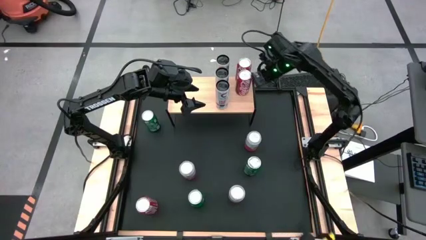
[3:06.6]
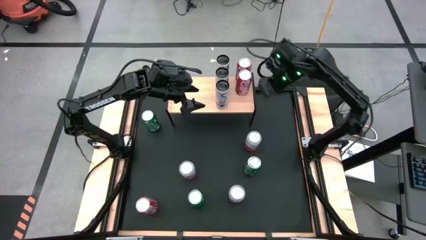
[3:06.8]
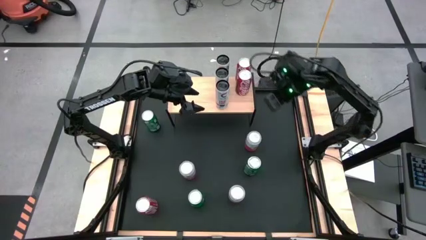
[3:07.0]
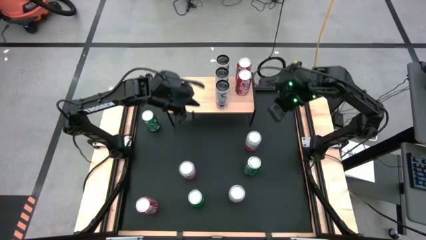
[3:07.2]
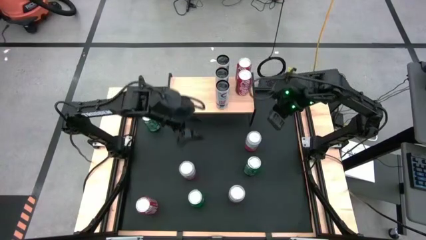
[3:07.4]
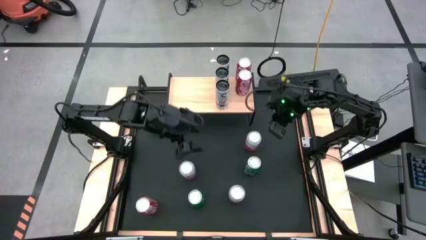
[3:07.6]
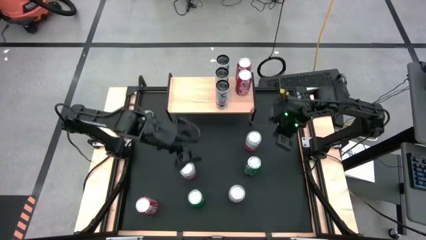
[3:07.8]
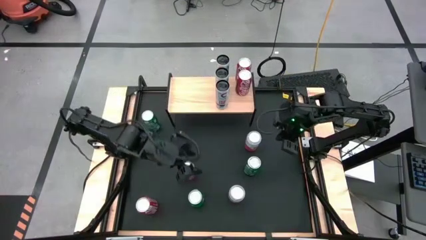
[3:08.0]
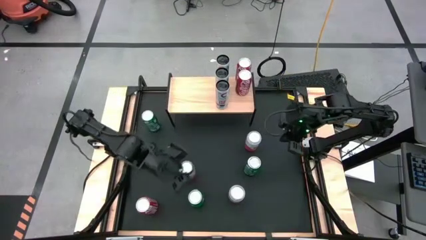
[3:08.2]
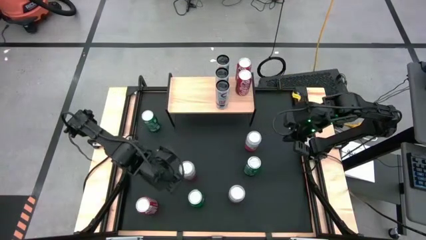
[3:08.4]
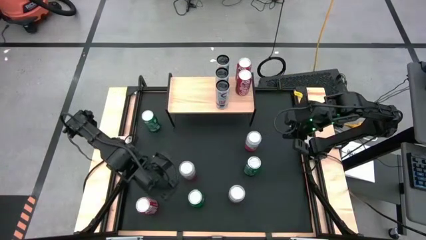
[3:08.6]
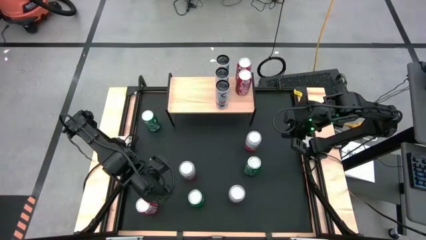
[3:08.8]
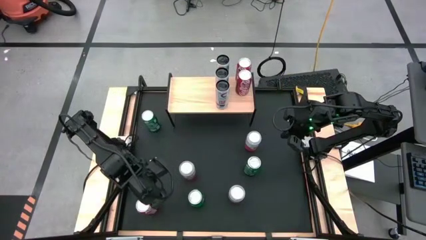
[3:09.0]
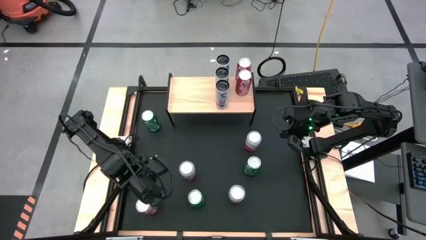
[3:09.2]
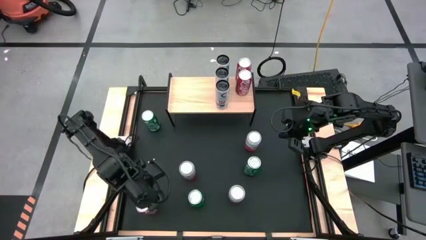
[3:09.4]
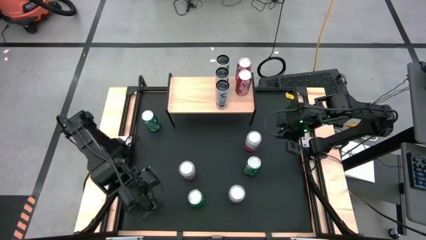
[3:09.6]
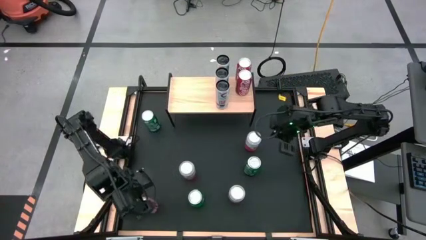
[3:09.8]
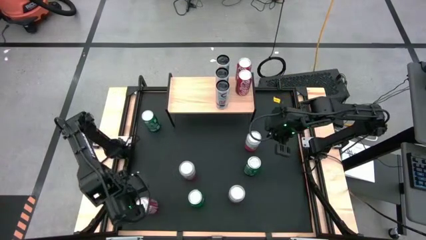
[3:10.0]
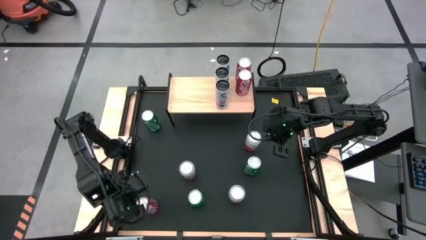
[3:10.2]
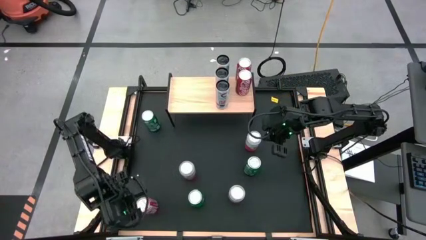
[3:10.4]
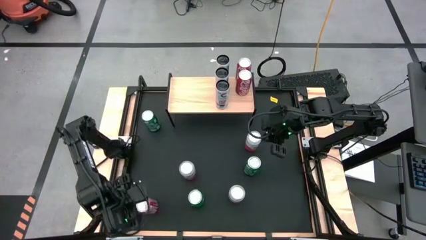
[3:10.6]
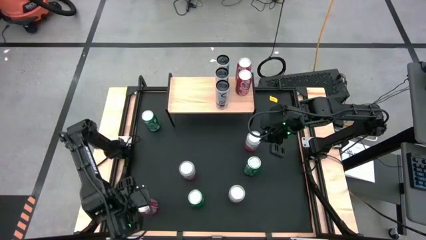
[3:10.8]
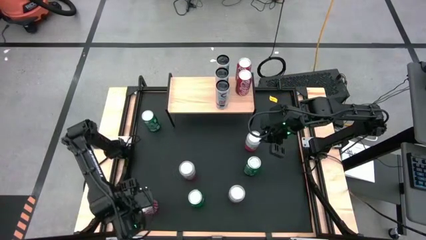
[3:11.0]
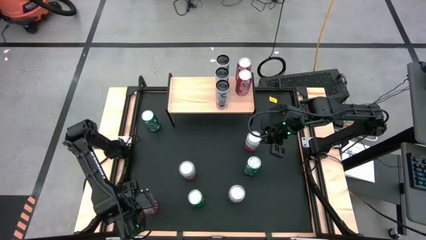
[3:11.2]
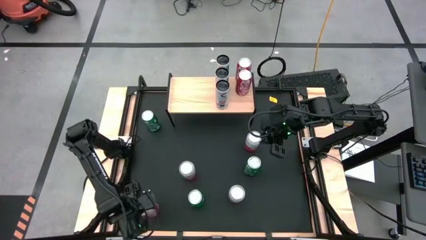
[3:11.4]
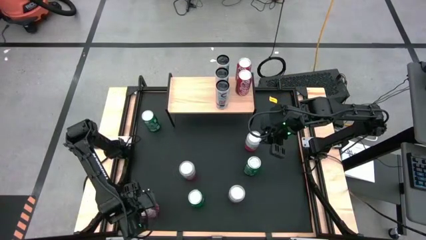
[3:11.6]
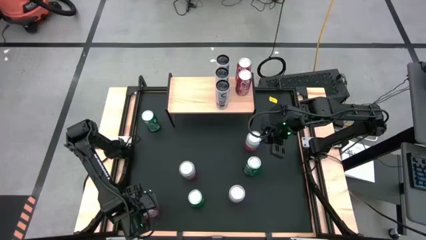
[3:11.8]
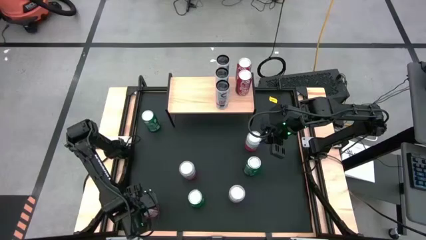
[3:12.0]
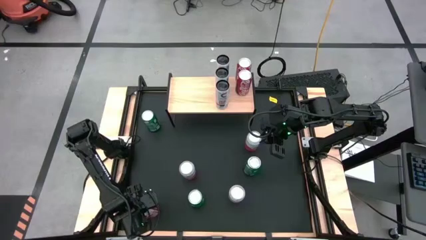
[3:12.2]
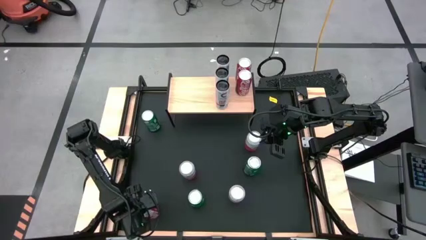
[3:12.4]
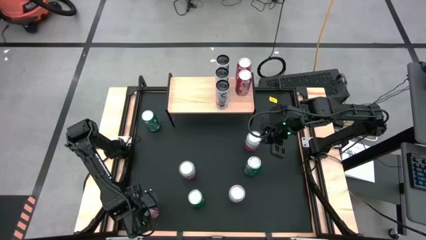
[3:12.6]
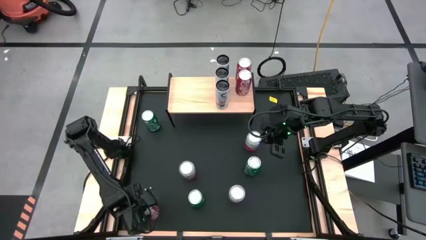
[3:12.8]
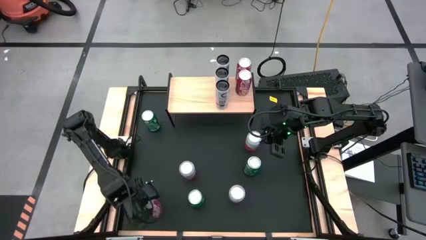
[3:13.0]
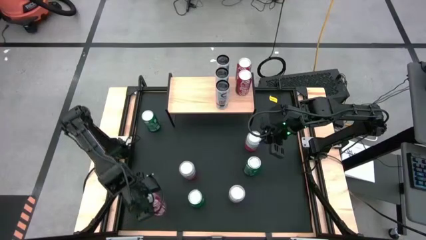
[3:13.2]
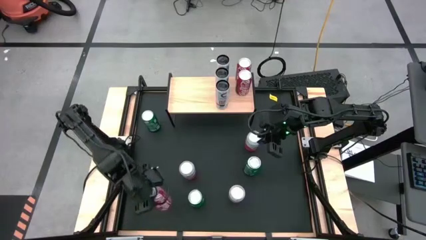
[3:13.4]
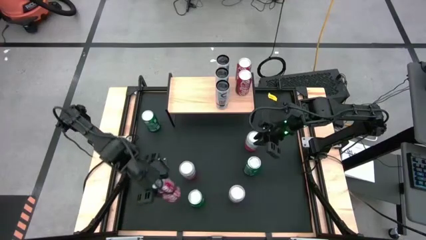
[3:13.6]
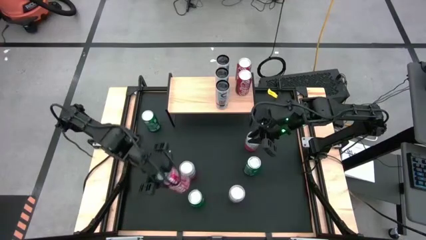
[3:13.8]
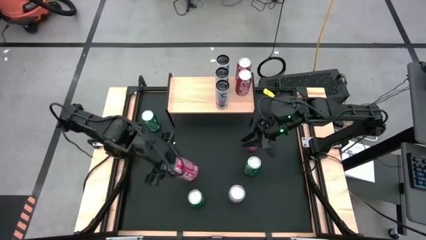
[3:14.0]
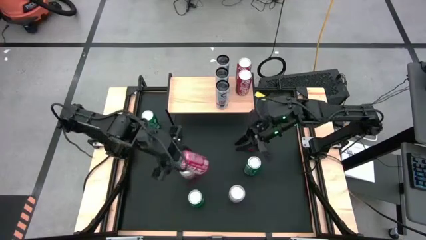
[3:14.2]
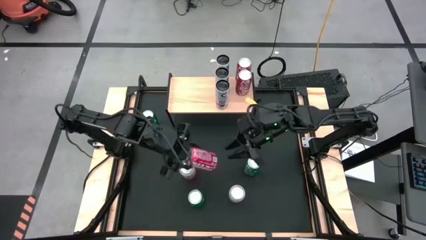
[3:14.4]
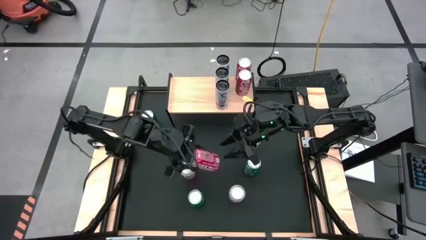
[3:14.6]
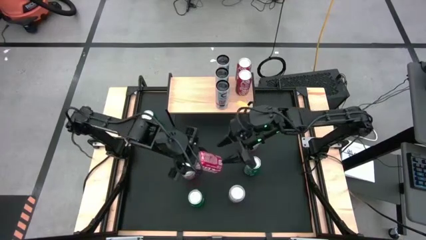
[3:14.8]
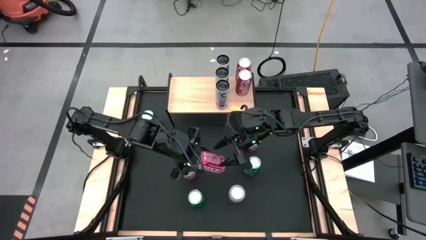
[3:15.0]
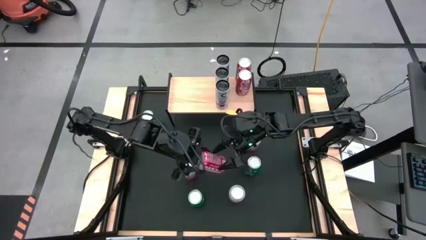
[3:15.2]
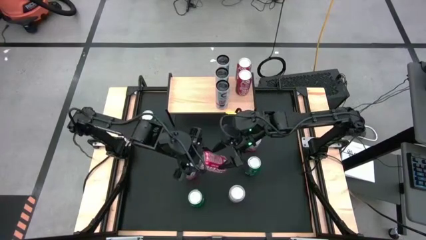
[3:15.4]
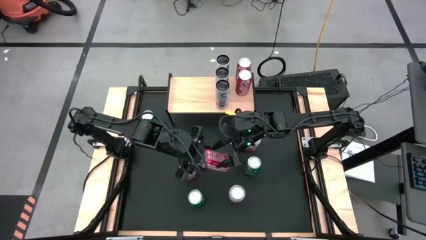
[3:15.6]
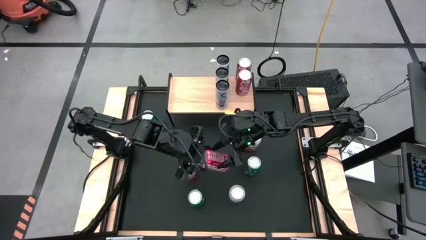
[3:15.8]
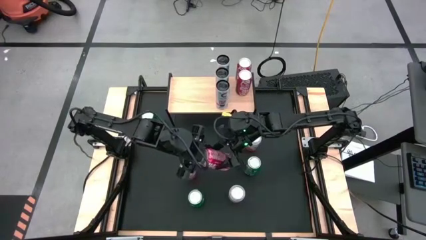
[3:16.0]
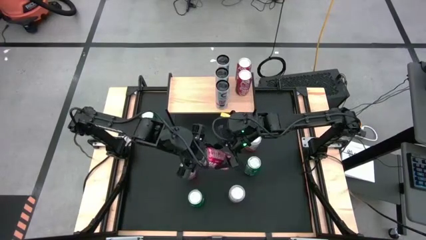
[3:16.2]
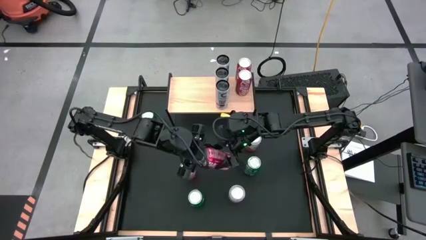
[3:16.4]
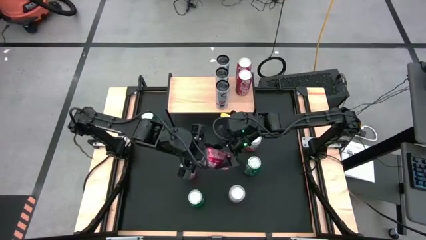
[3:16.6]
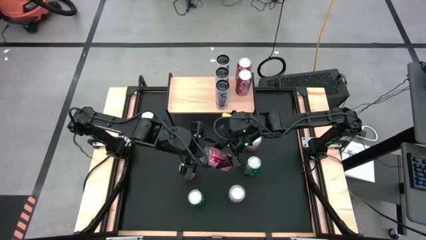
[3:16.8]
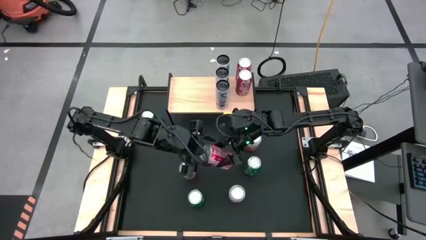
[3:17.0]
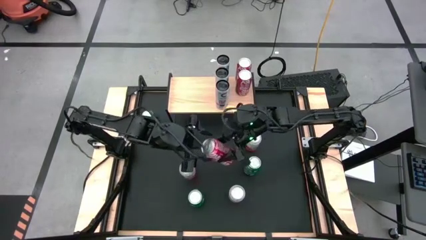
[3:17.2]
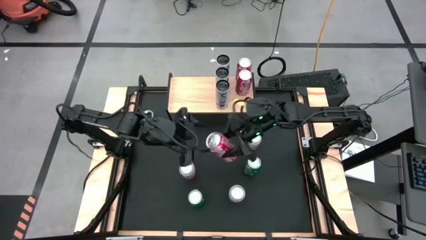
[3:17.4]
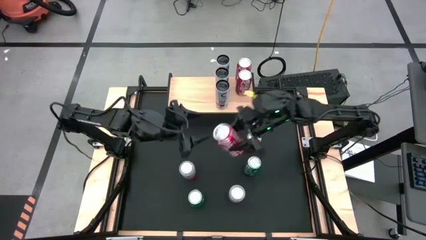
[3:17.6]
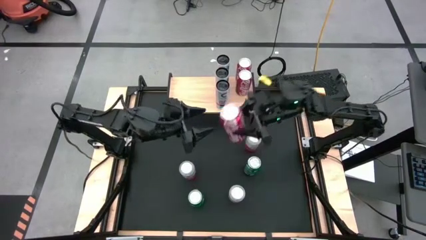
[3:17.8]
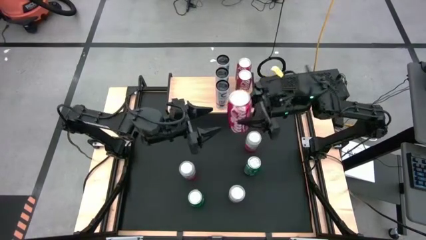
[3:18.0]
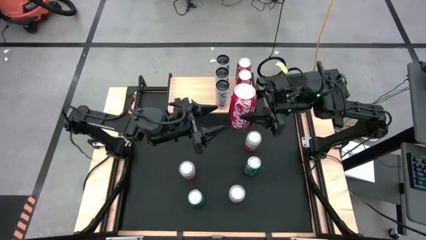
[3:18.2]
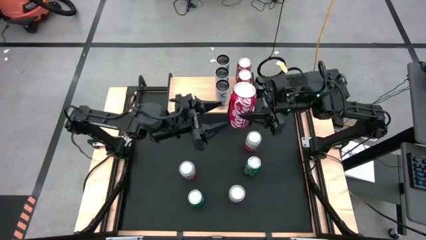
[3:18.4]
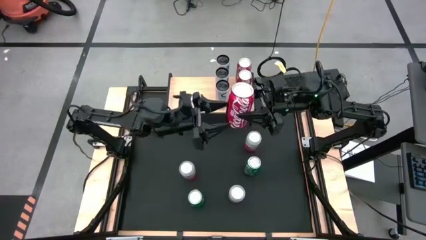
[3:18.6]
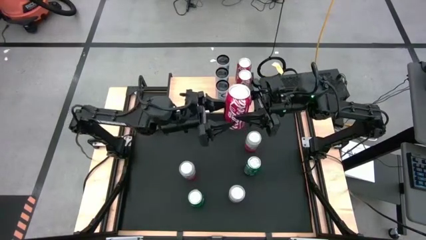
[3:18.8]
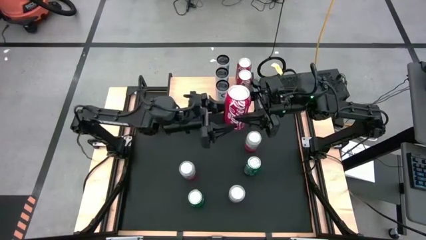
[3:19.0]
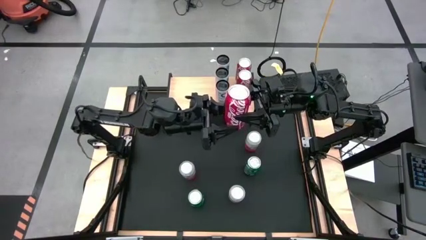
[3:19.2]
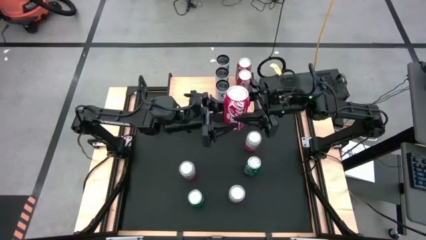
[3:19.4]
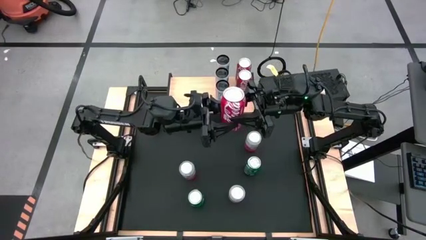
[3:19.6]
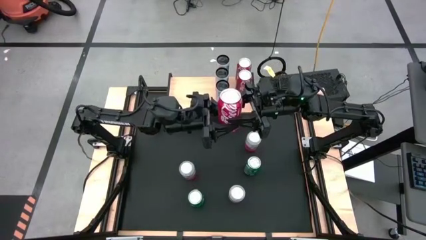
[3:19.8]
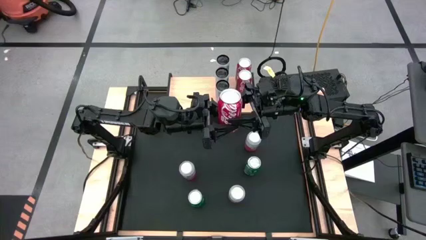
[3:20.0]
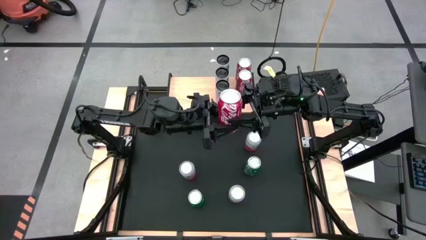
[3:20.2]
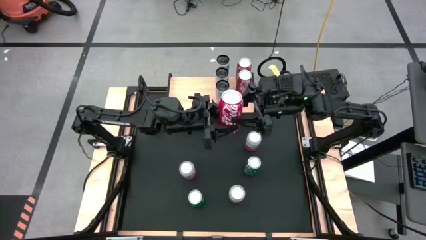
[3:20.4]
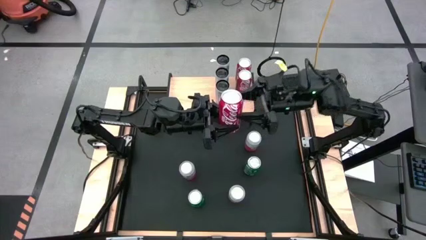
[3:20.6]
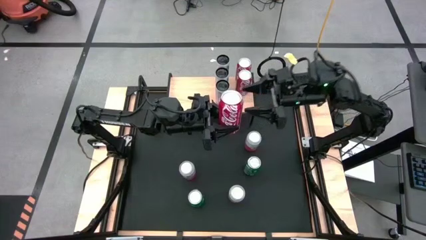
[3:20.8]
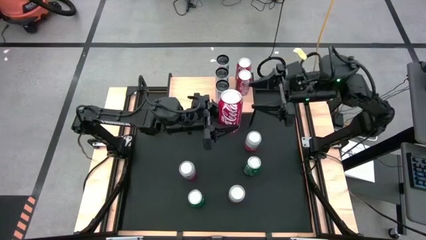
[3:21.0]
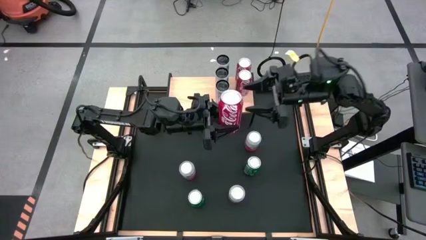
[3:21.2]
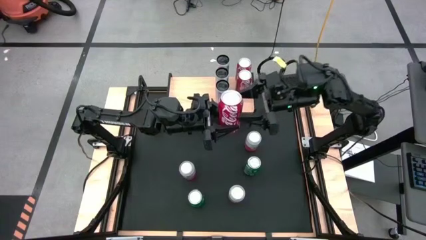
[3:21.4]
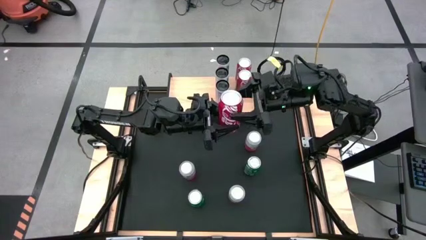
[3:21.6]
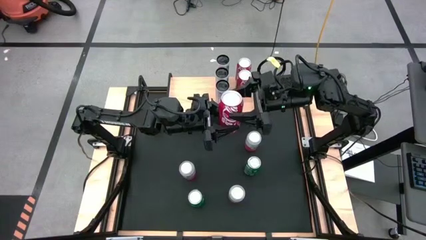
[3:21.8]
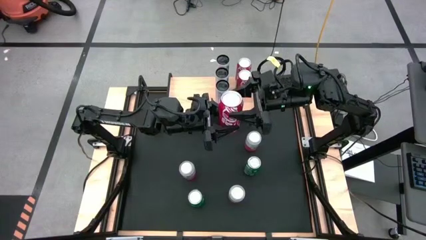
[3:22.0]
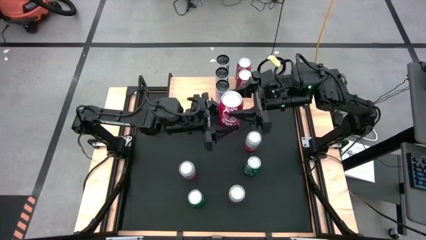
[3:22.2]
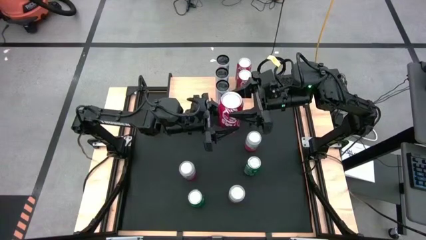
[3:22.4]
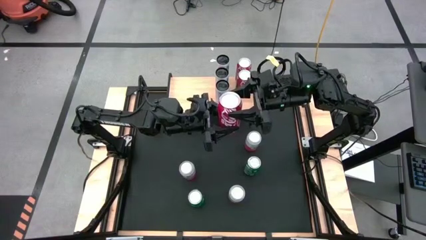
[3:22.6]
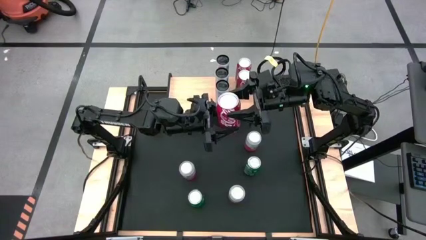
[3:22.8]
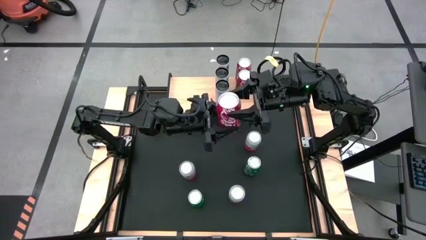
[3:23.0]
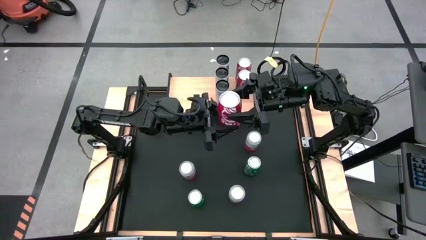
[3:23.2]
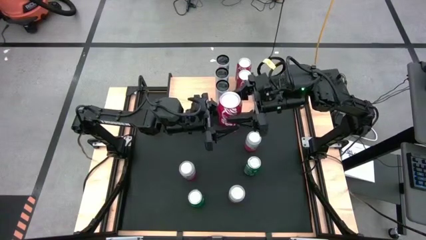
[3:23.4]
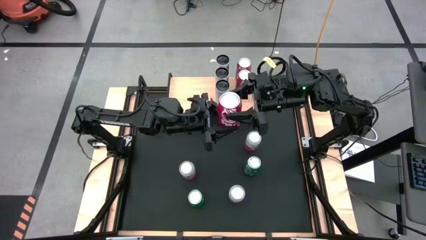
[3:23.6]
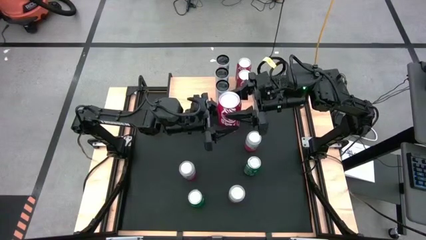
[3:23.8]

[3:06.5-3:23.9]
Task: Place canned beverage on shelf
Put the red soda can aligned with the other red soda cans on the shelf
